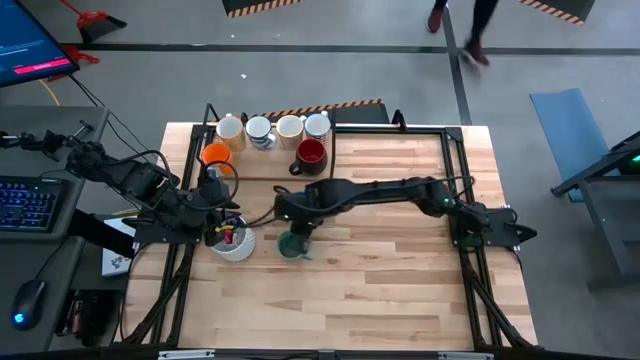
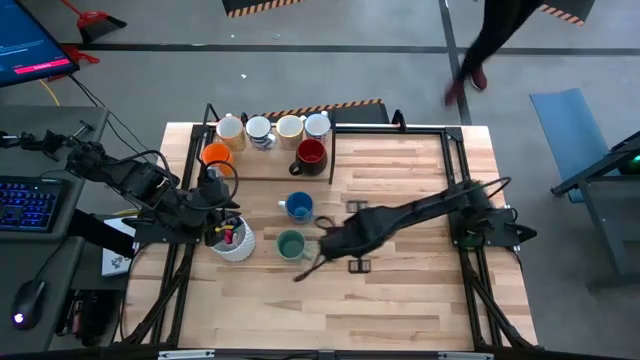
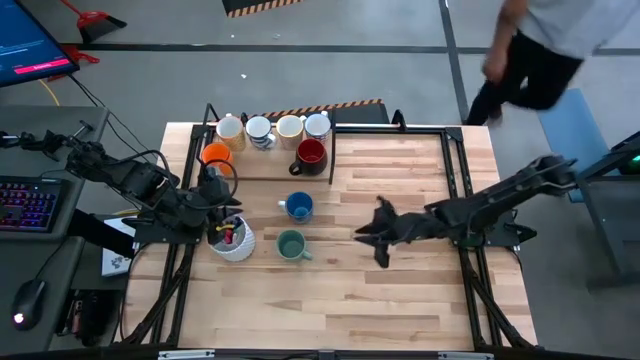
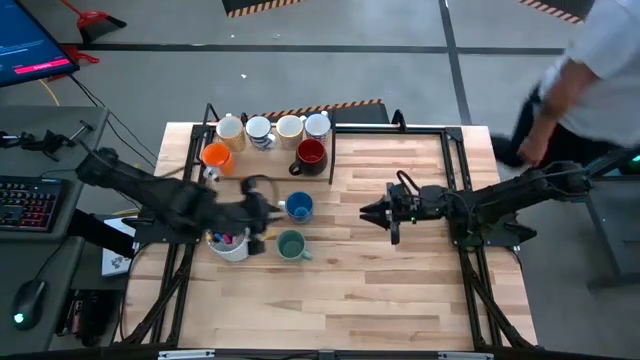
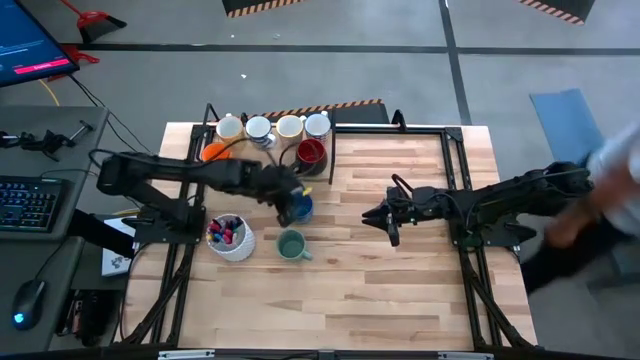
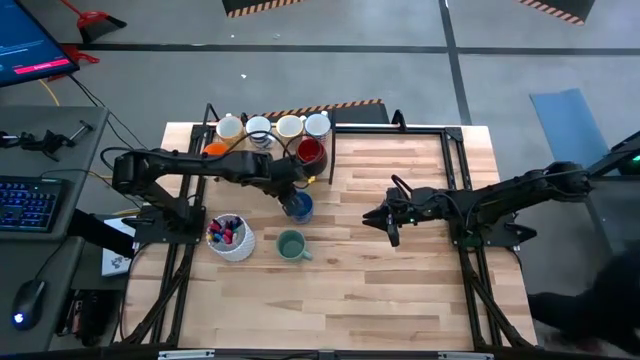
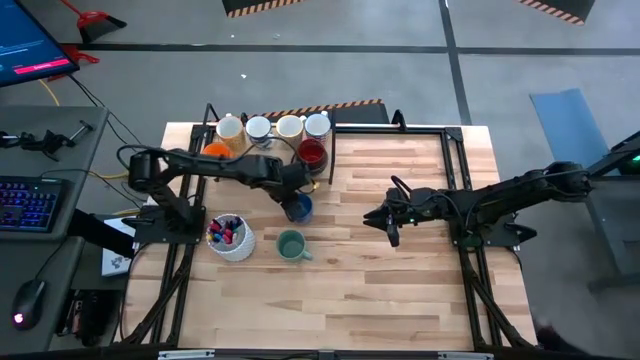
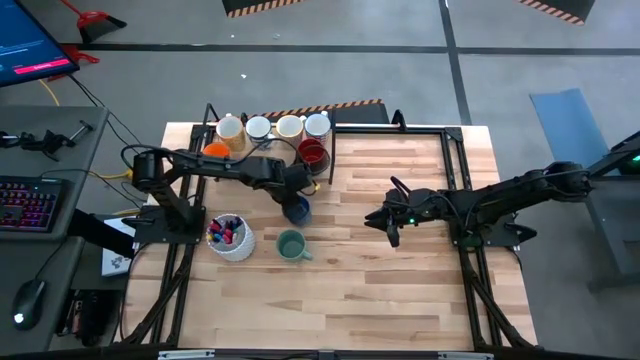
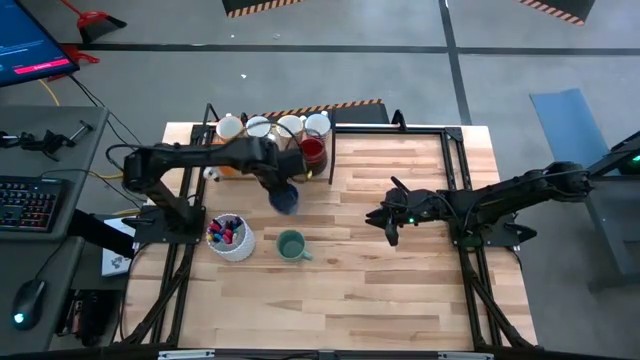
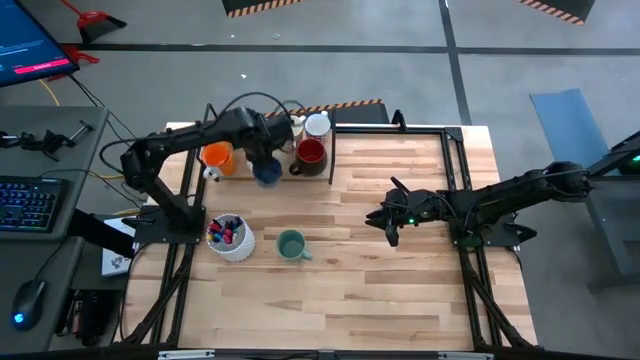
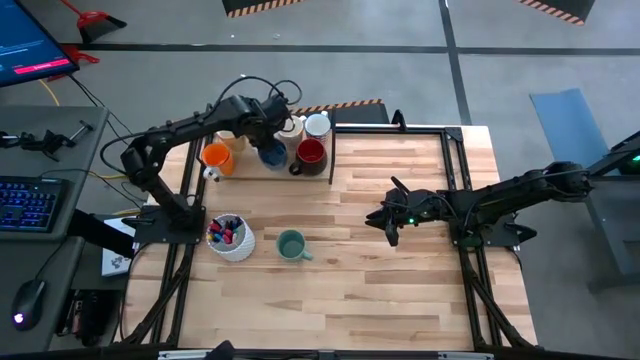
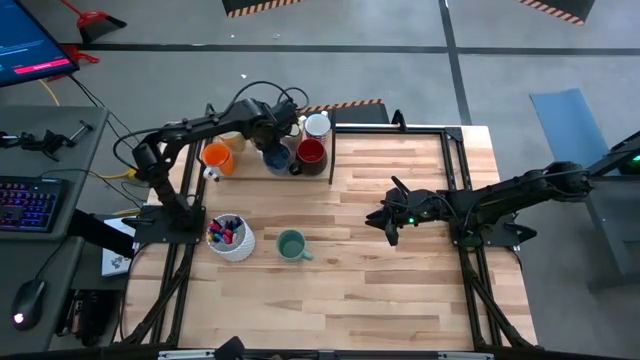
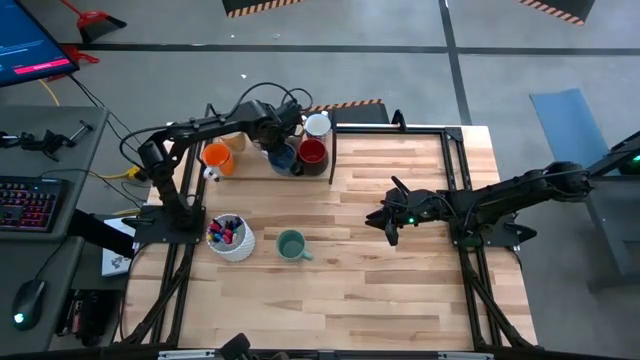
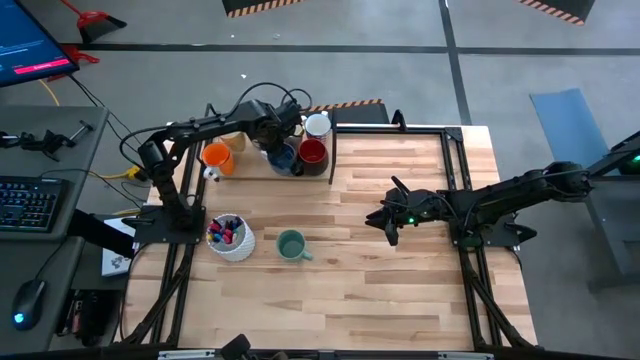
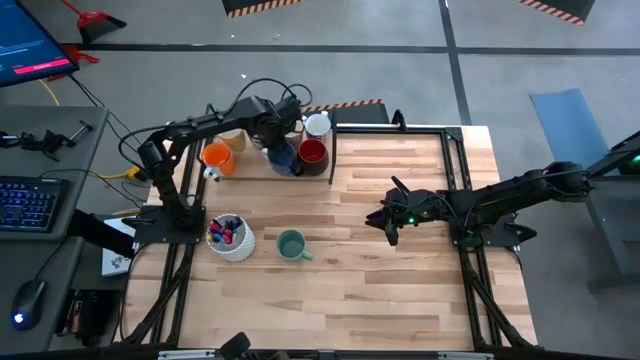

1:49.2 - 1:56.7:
Task: Place coffee mugs
Put the blue mug on the shelf

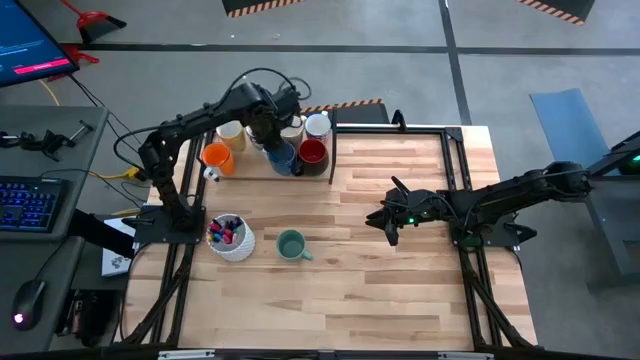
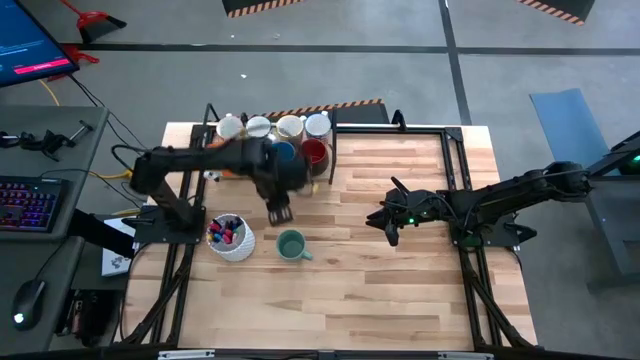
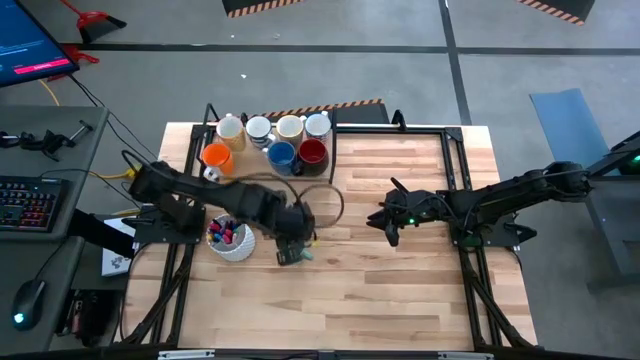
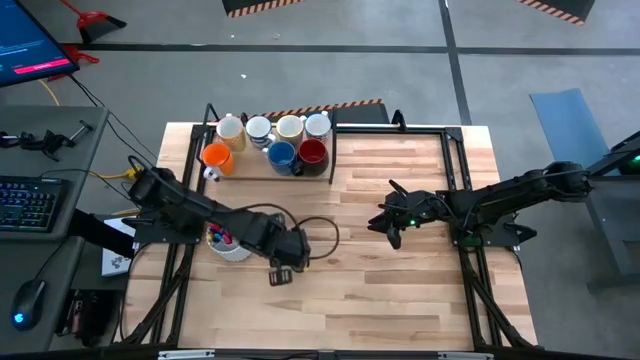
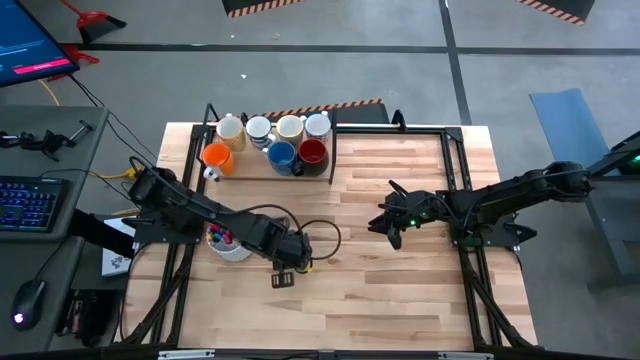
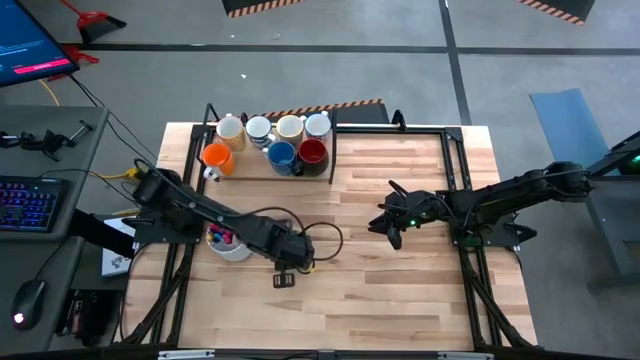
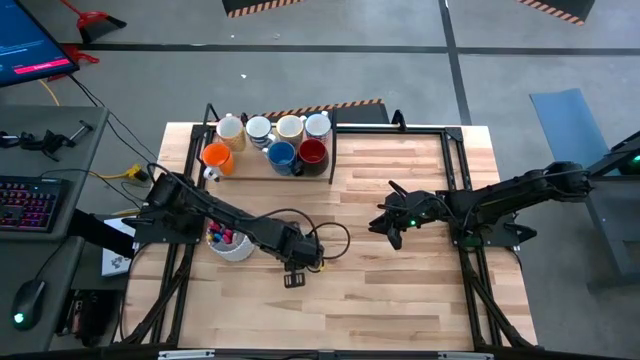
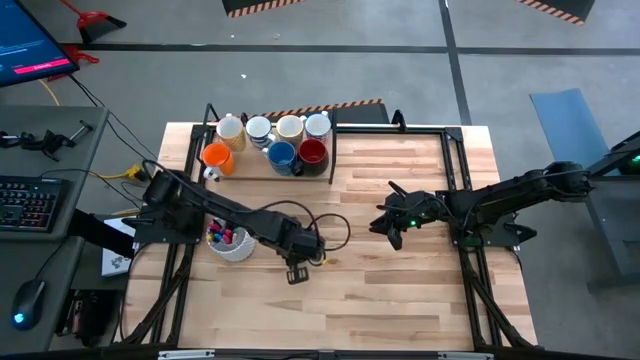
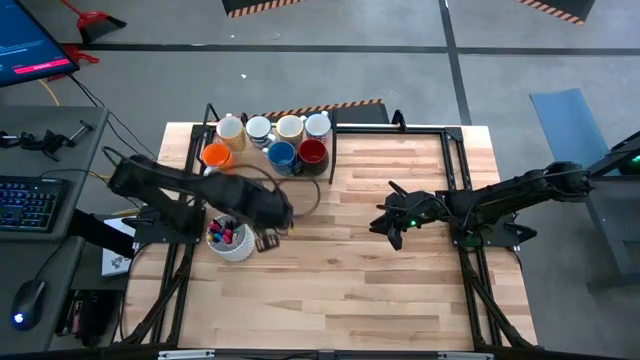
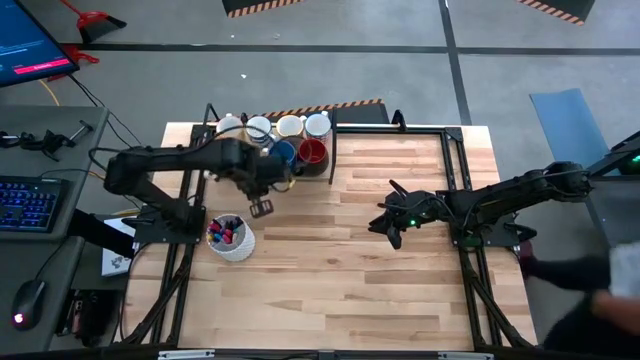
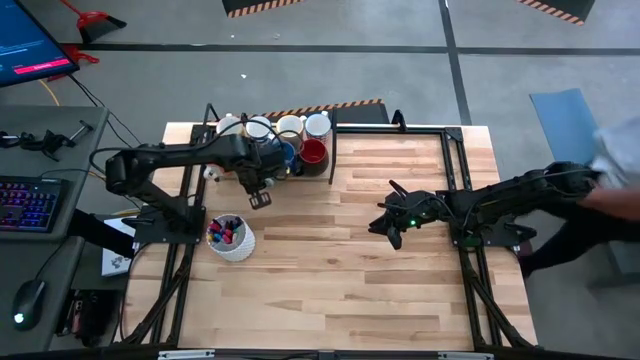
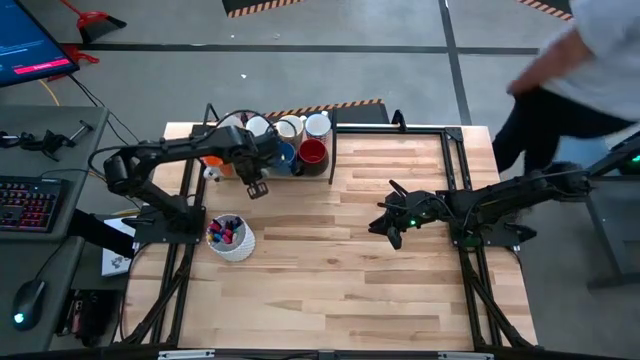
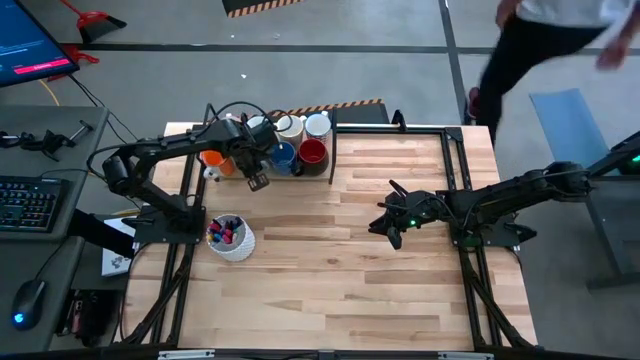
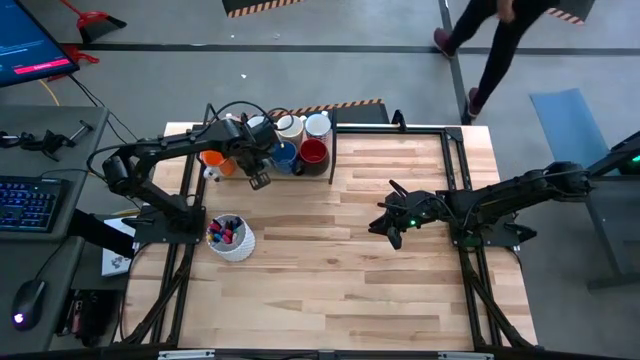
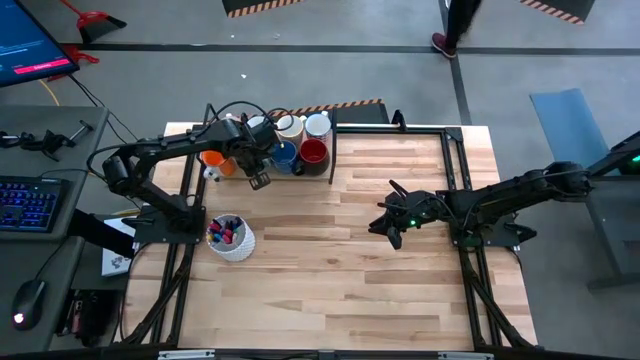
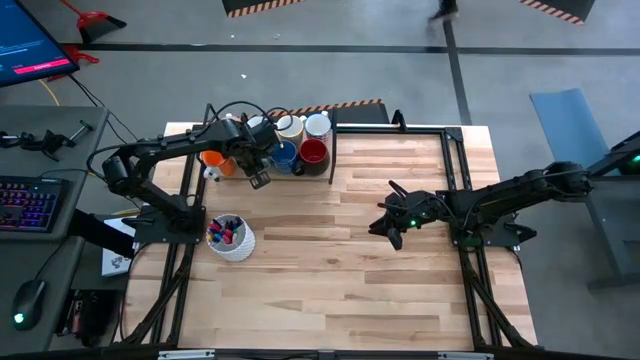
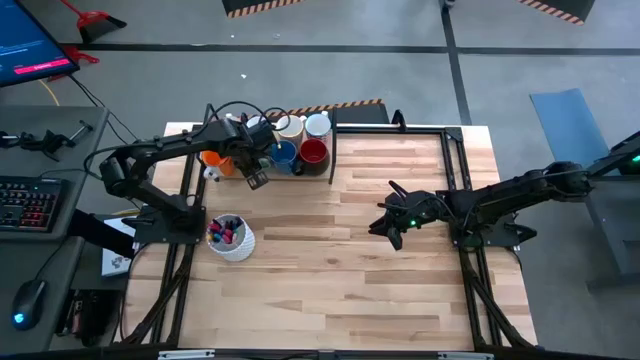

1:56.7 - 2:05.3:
Put the green mug on the shelf

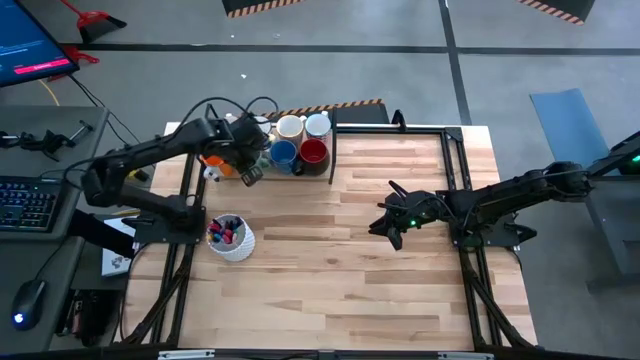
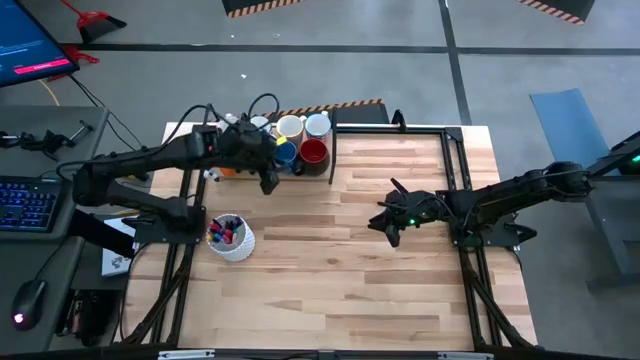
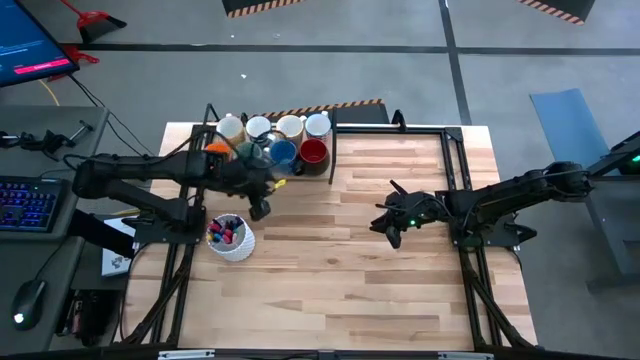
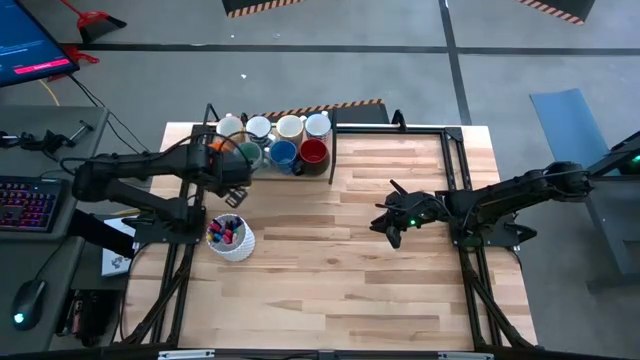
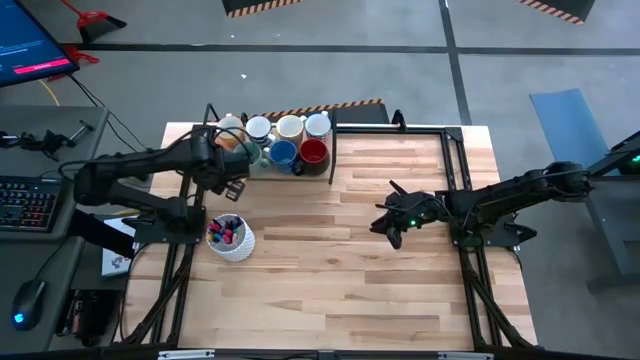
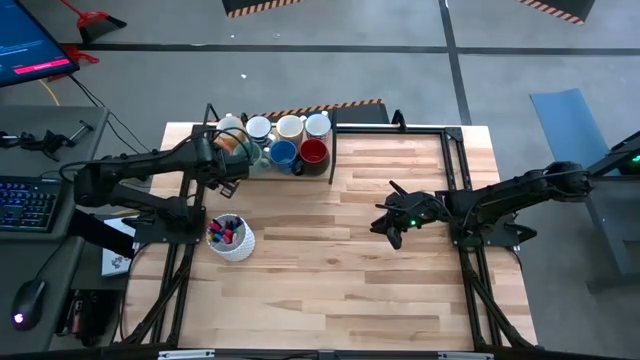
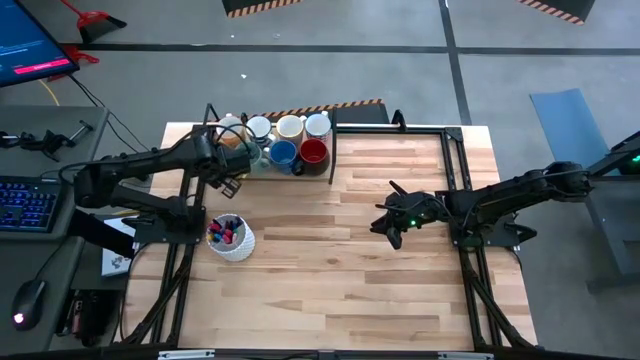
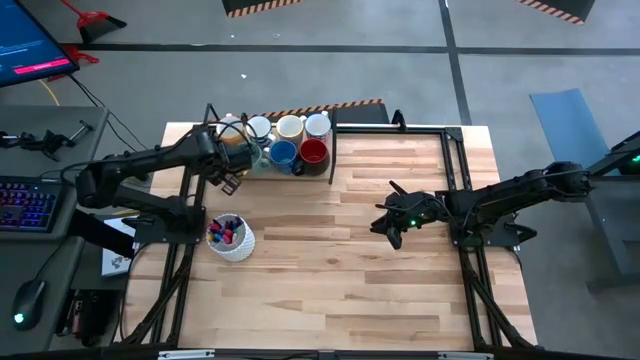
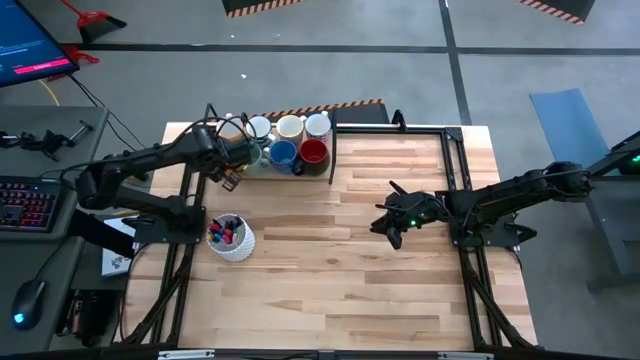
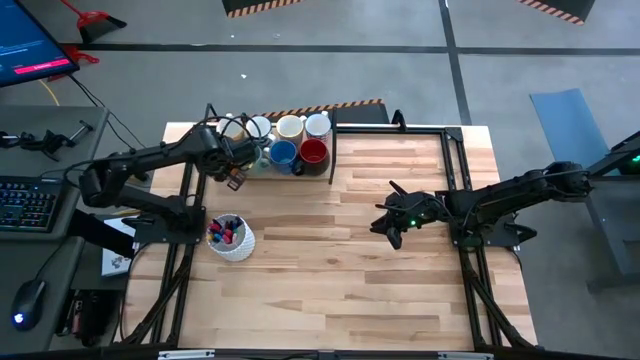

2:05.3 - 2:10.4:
Adjust the orange mug on the shelf

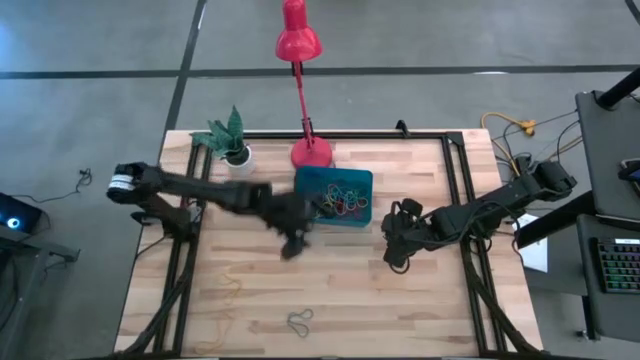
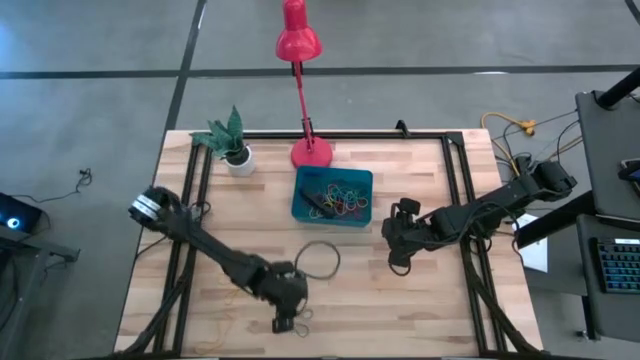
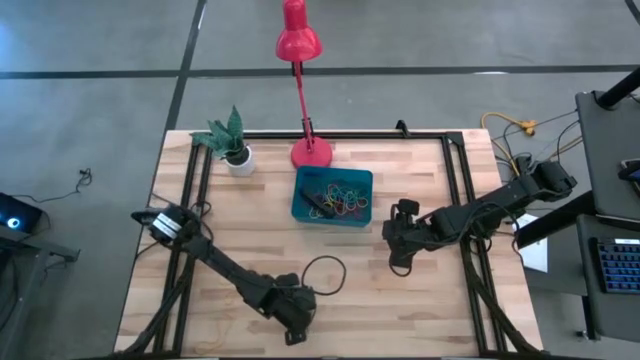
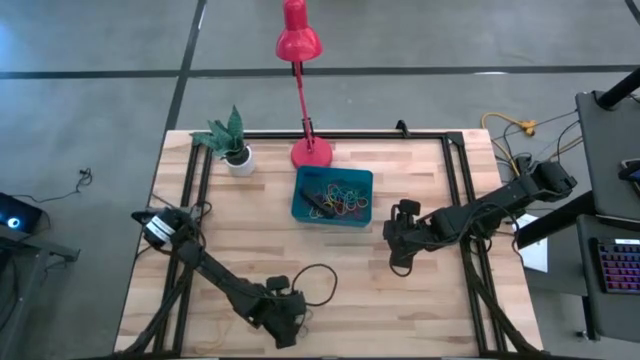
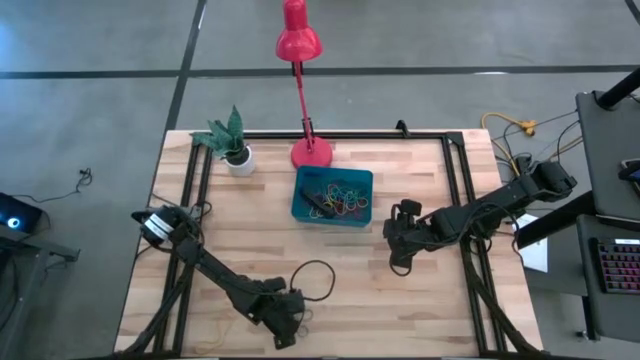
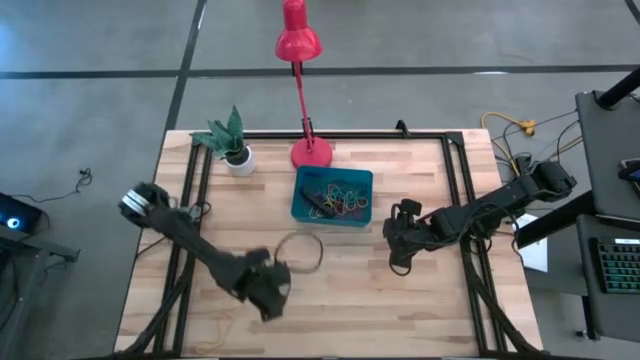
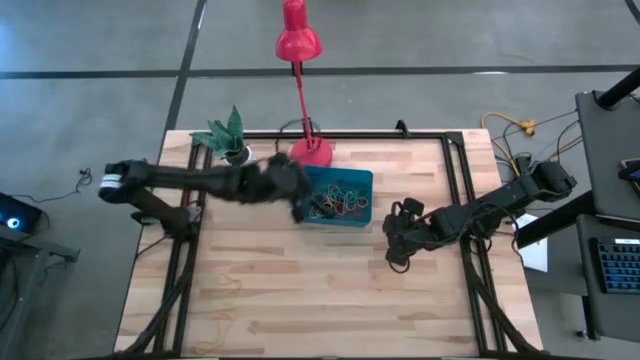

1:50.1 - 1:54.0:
Task: Pick and place rubber bands into bin
Put the blue rubber band into the blue bin
